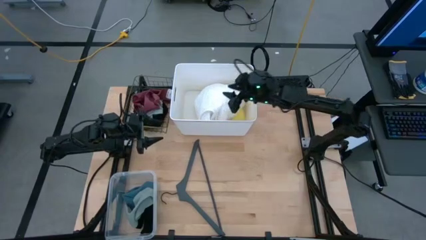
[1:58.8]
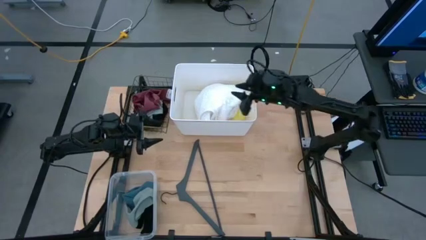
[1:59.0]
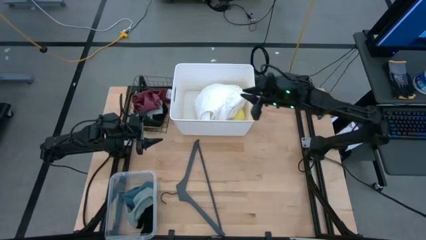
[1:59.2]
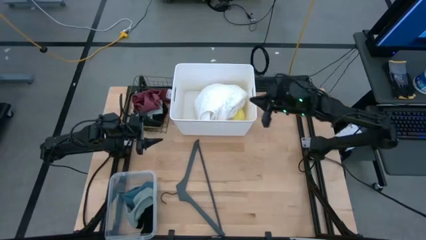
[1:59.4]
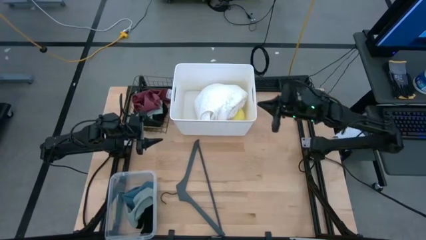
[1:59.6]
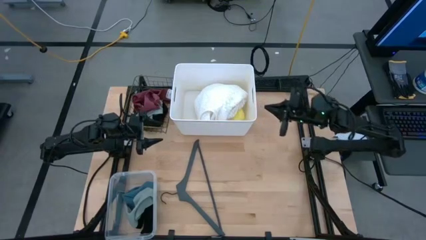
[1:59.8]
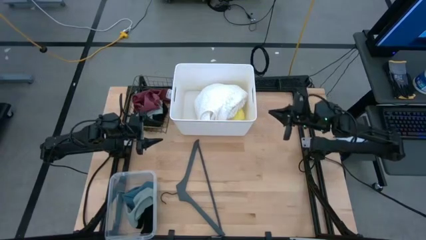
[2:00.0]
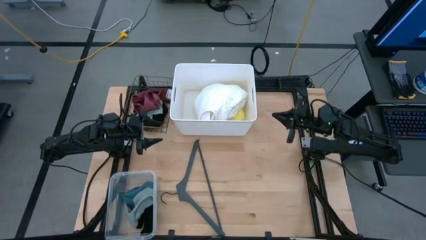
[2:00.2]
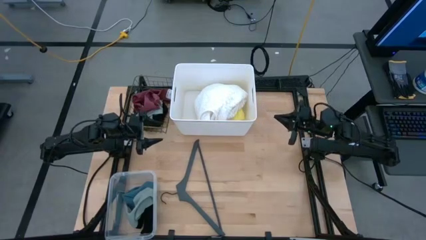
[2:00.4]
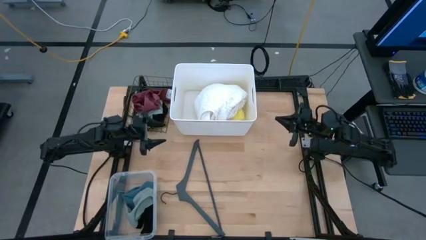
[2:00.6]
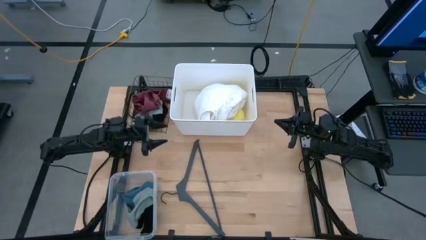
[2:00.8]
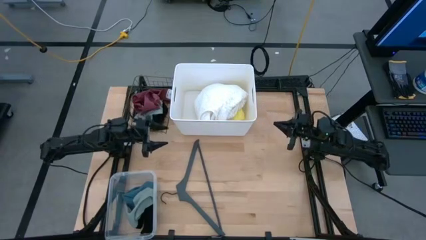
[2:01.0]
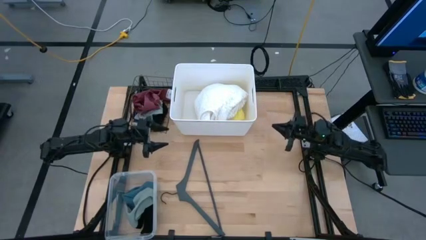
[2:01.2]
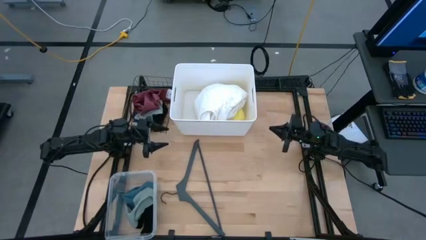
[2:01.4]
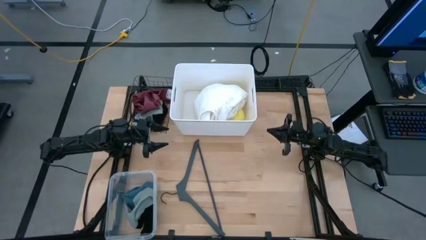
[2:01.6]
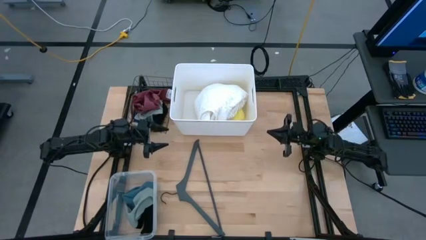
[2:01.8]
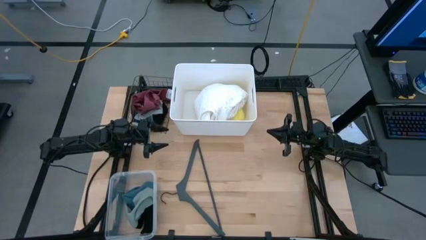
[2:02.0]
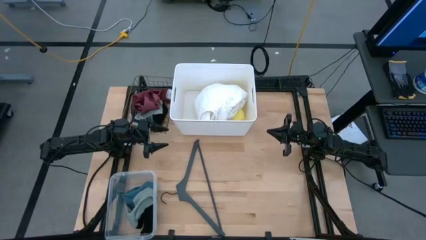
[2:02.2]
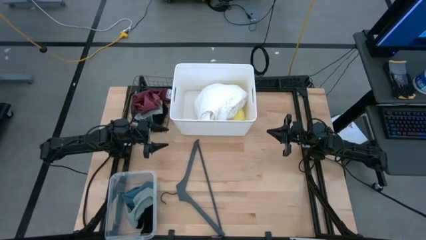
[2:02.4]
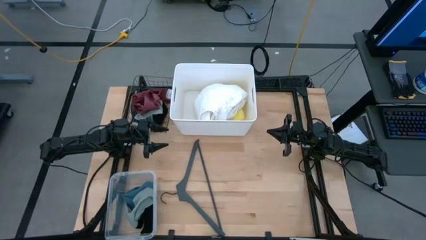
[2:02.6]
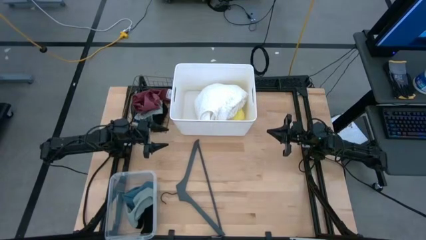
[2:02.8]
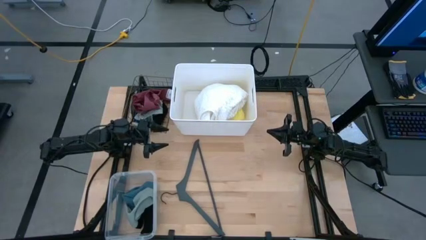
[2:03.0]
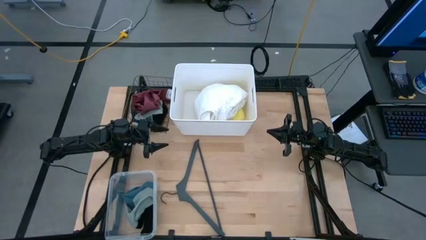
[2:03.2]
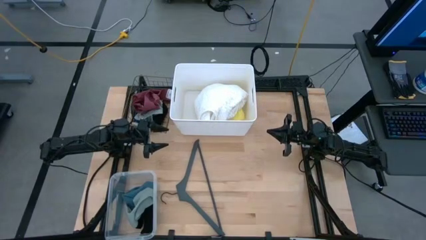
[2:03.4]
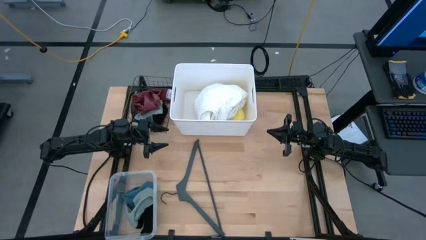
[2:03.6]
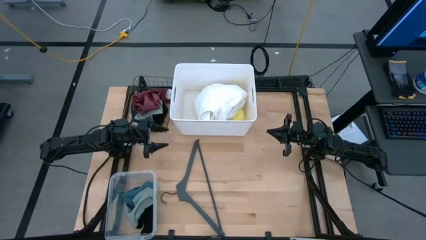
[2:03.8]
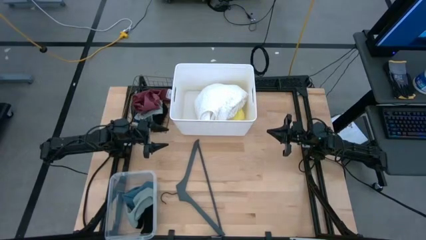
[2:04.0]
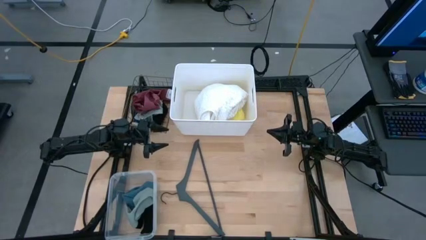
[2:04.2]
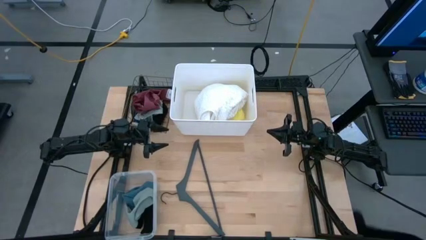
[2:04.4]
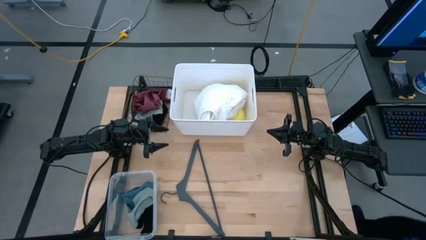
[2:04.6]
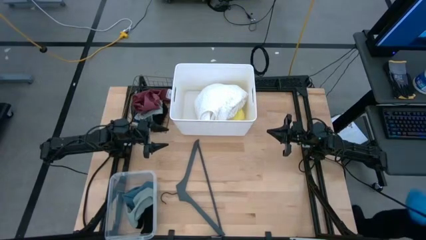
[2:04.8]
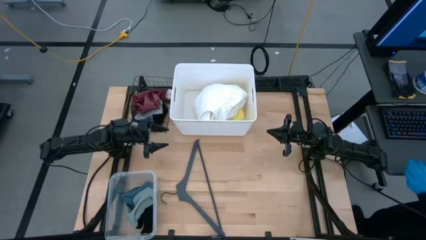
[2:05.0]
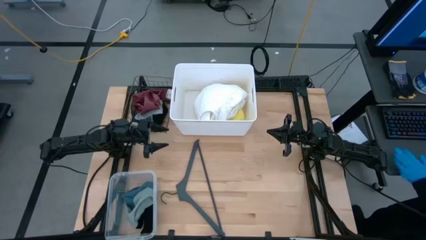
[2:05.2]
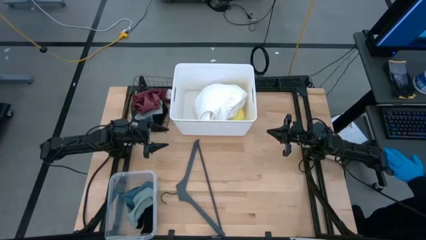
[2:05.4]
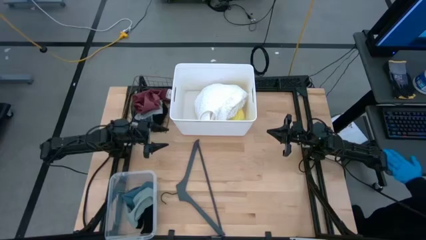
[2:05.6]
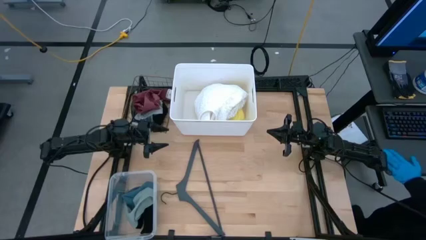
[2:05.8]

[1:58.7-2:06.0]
Task: Pick & Place Cloths
Return to Home Position

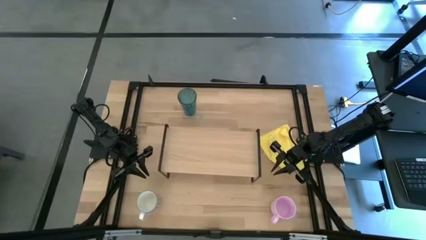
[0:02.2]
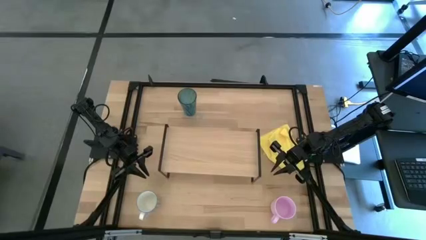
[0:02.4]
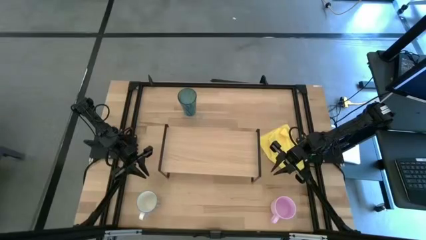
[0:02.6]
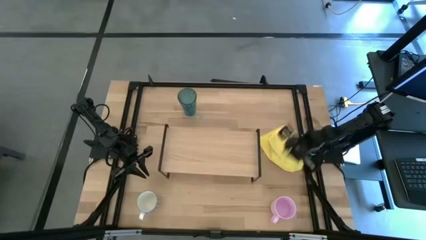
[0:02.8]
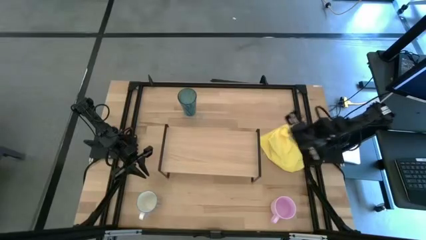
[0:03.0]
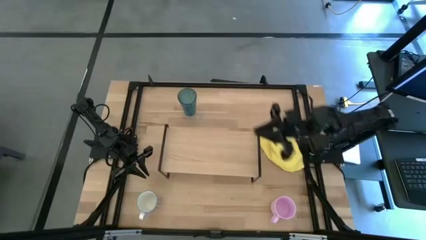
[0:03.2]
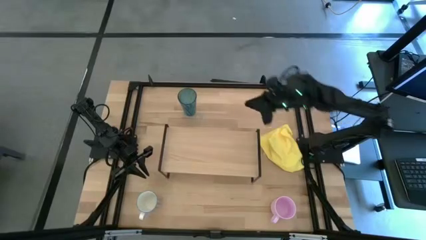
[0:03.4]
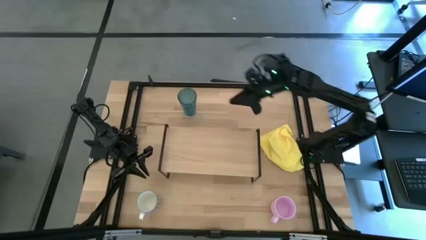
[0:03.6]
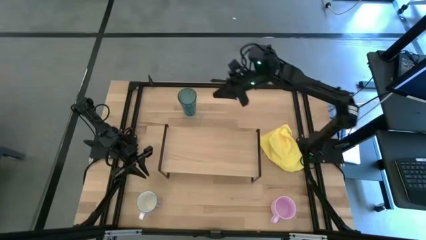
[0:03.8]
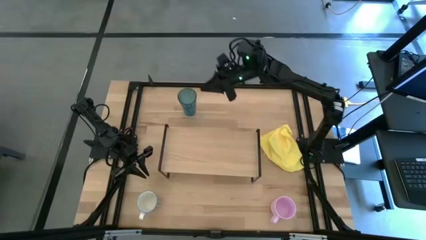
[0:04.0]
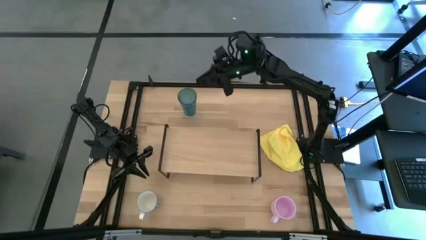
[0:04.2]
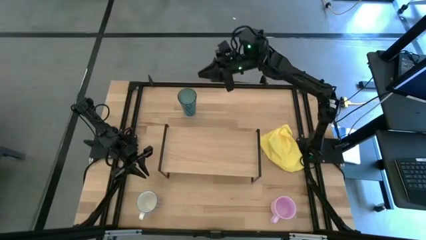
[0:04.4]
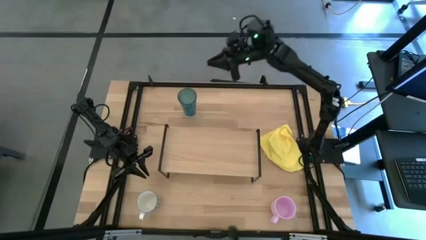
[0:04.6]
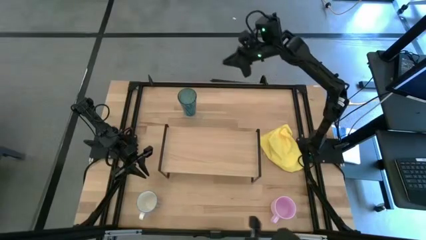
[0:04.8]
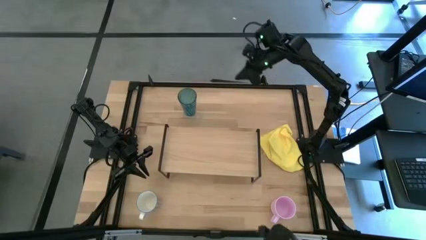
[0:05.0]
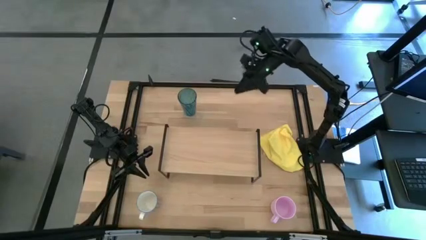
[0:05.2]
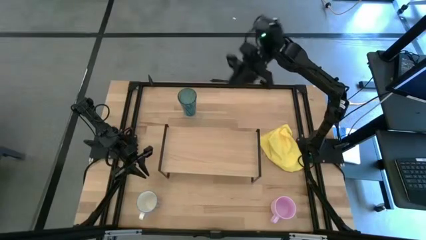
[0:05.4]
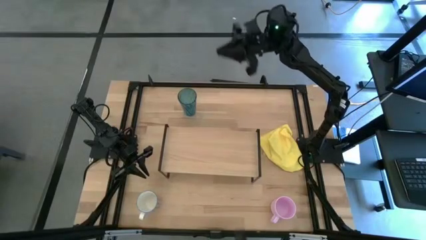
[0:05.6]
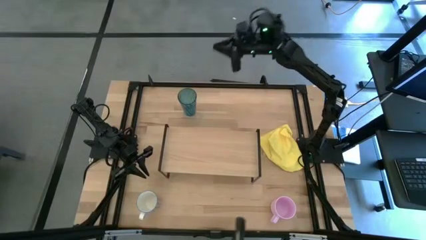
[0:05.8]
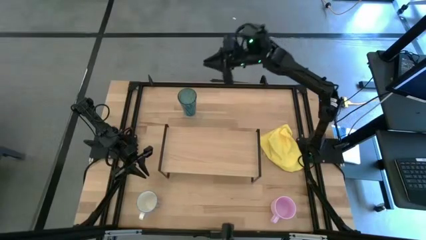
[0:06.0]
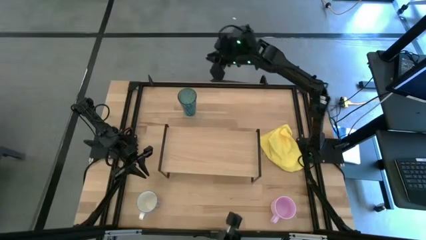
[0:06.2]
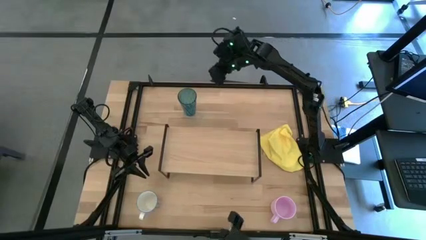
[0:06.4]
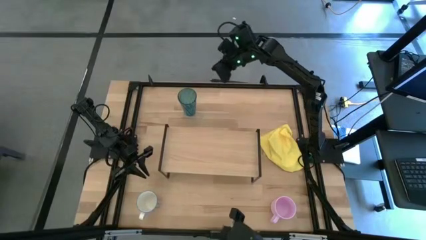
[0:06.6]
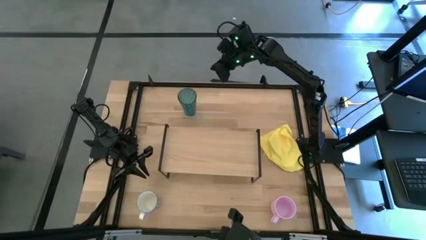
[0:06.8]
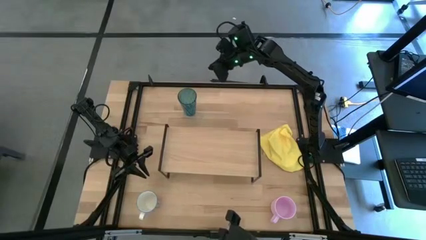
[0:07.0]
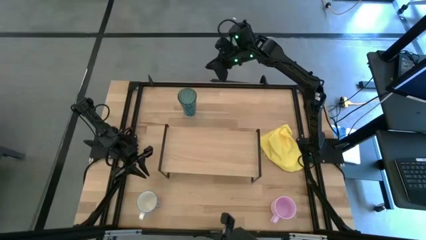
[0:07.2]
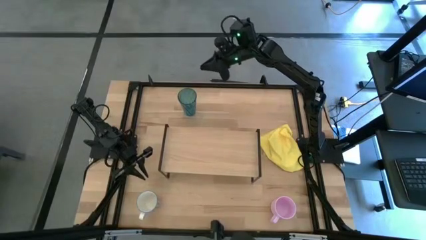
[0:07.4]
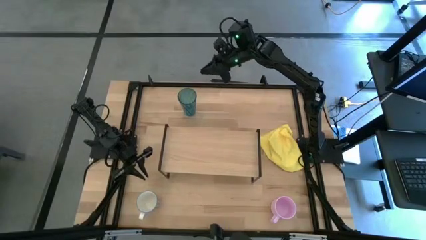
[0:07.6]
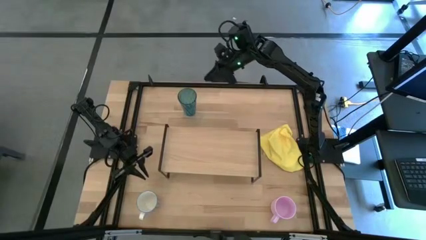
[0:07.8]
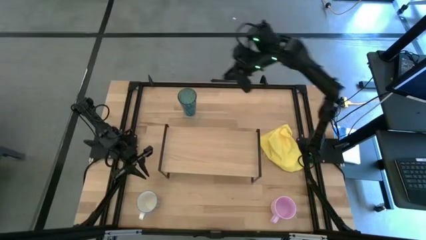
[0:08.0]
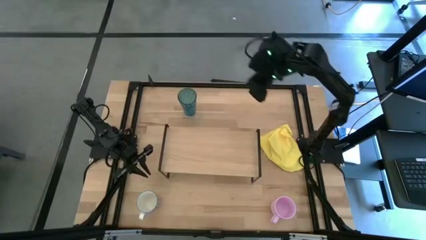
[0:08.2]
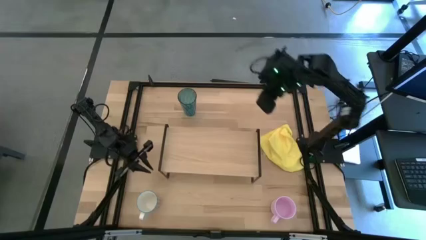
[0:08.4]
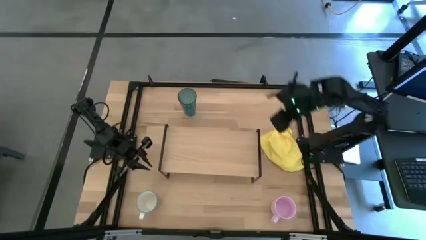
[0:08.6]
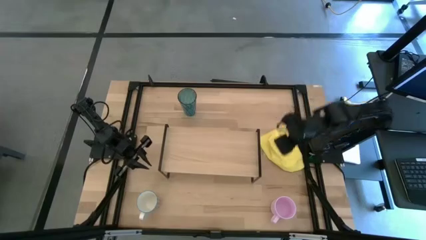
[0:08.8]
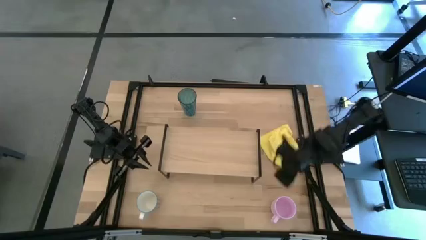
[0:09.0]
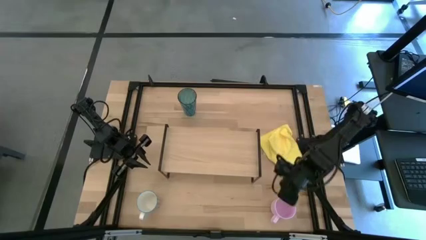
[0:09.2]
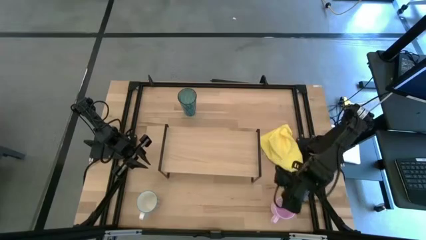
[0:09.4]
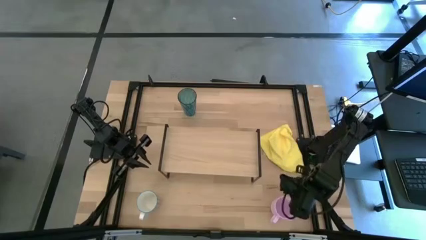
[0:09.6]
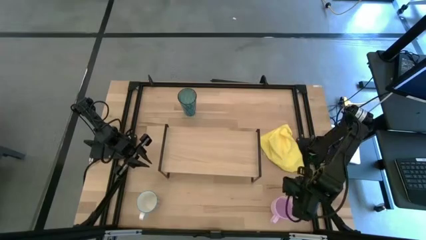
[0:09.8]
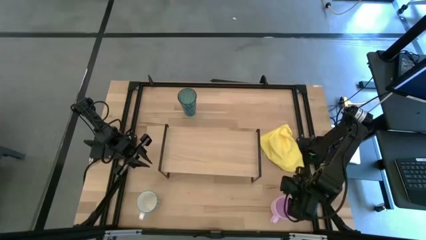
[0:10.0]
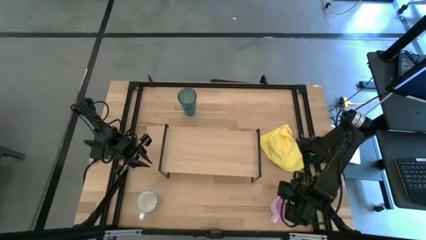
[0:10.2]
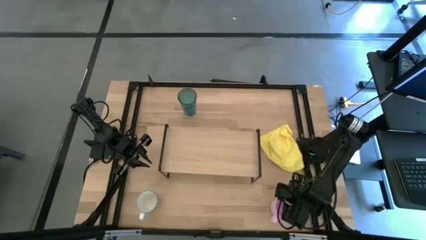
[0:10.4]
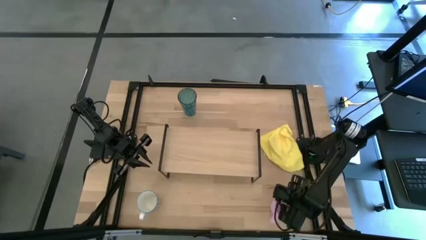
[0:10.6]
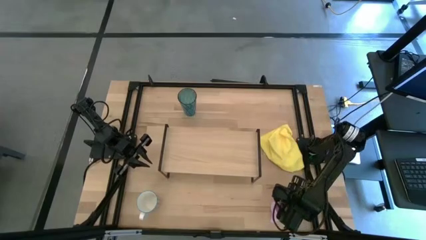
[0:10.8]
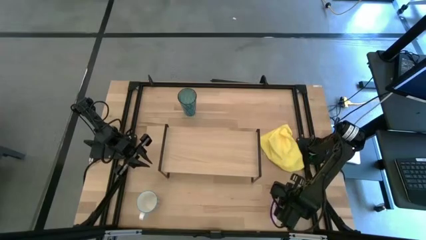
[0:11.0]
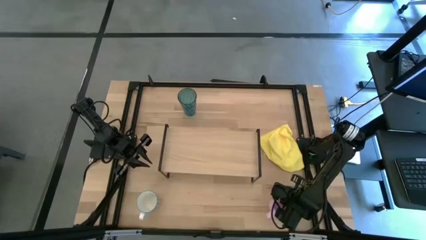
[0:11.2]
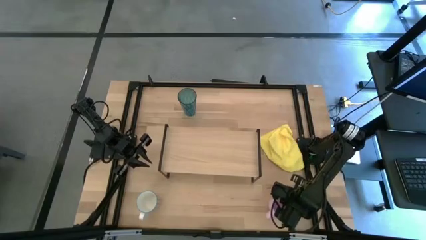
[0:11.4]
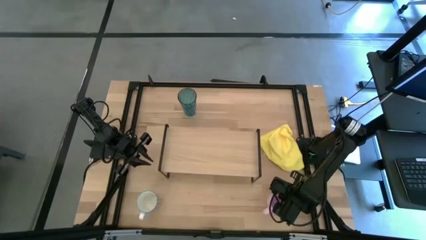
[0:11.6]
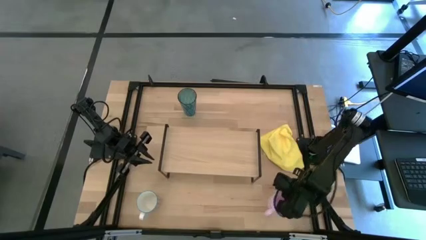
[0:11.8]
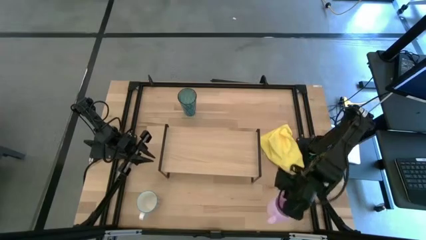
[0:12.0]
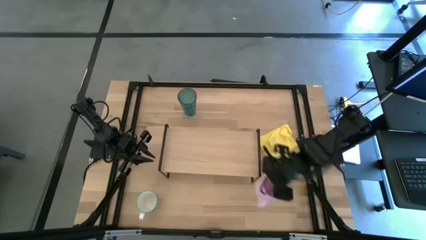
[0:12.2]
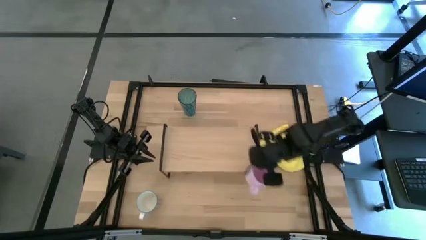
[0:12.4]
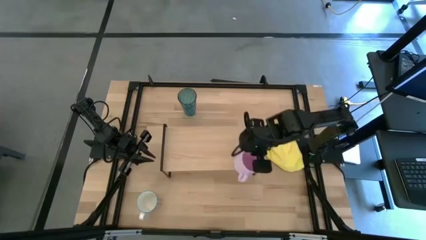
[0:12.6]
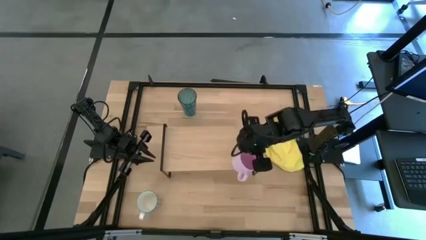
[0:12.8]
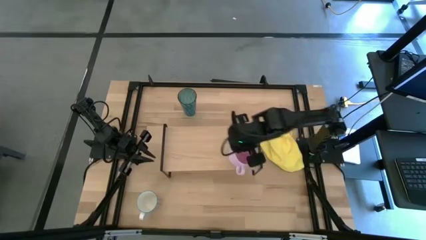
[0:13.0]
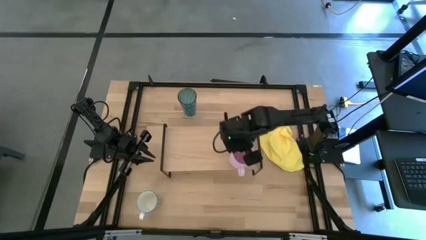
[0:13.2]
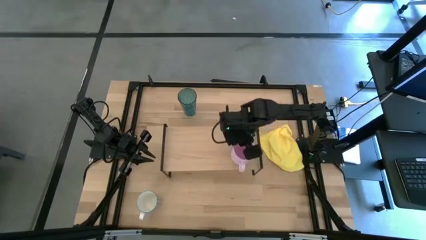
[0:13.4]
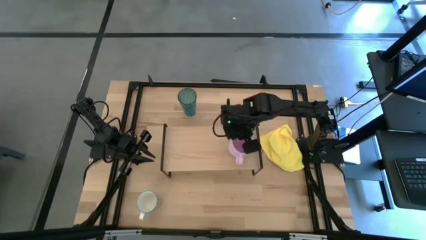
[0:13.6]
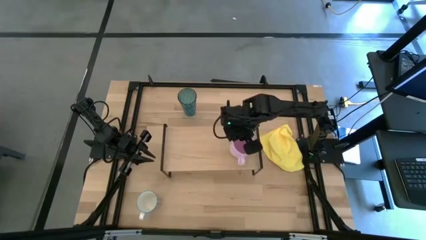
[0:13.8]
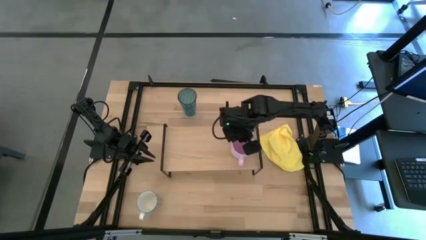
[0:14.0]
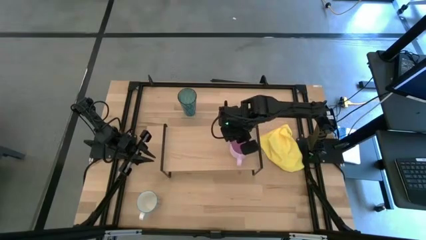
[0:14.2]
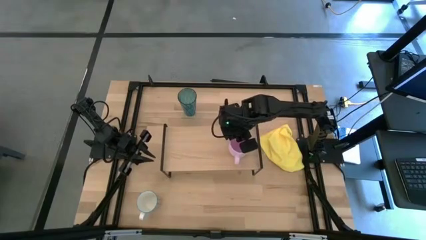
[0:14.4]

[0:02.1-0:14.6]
Task: Stack small to large cups/mugs on shelf
Put the pink cup on the shelf
